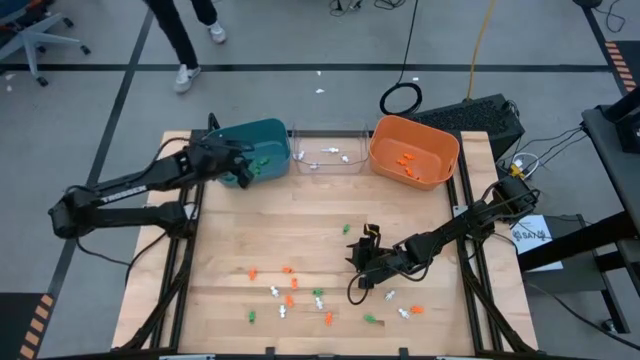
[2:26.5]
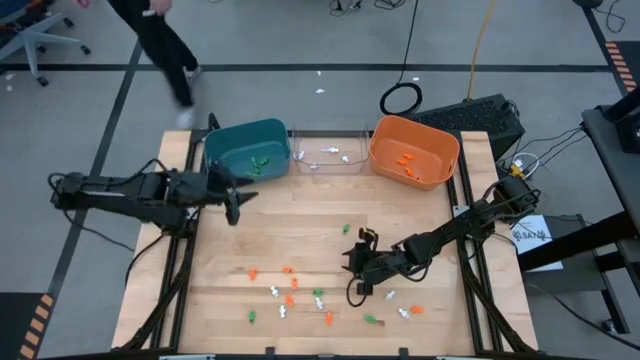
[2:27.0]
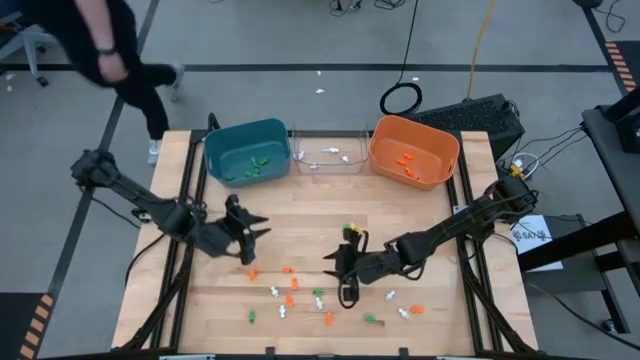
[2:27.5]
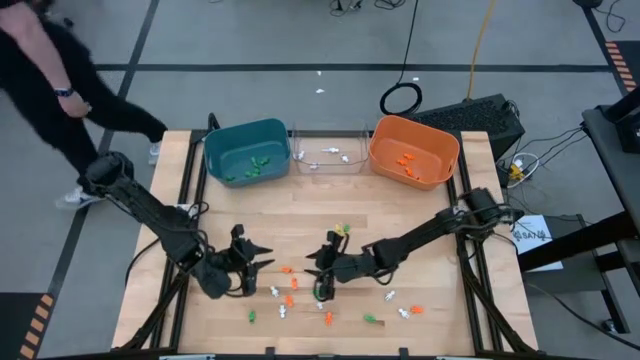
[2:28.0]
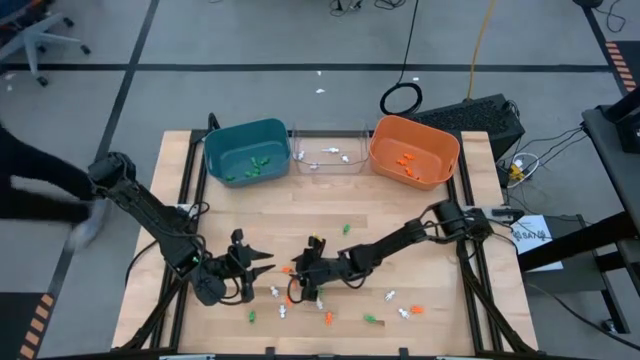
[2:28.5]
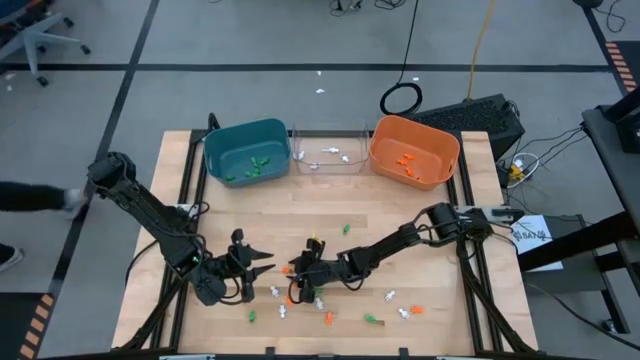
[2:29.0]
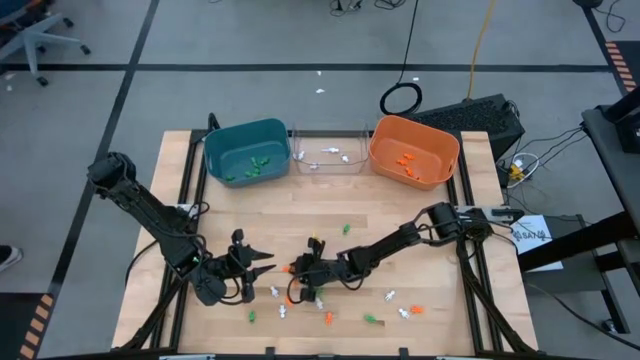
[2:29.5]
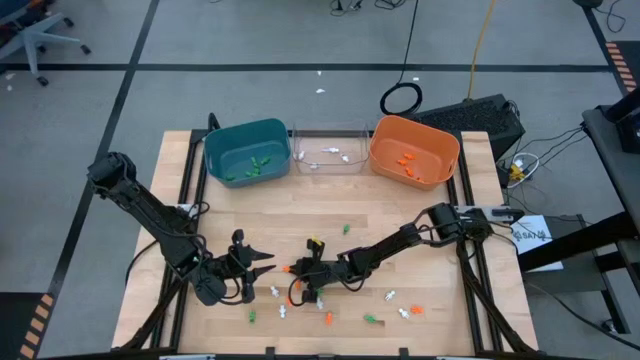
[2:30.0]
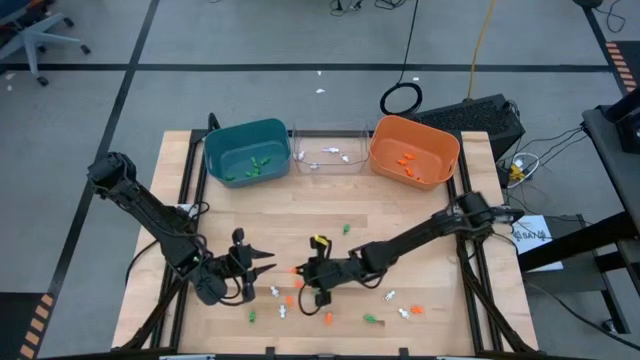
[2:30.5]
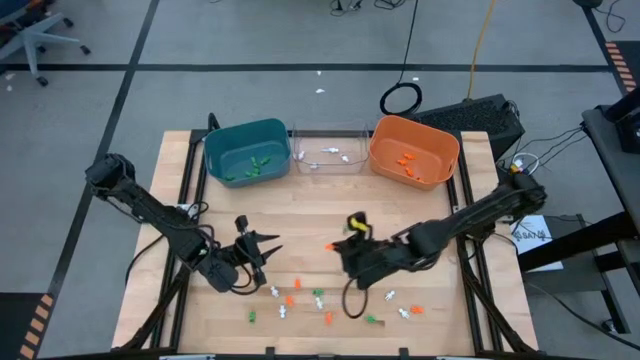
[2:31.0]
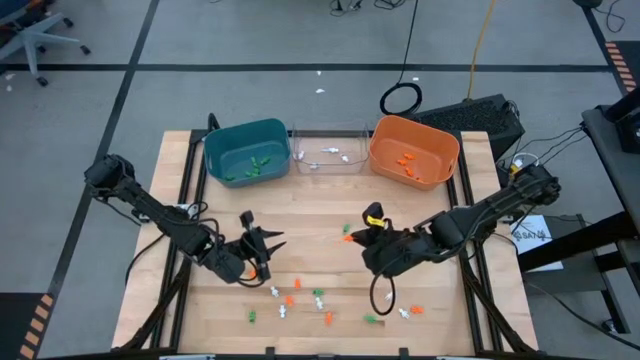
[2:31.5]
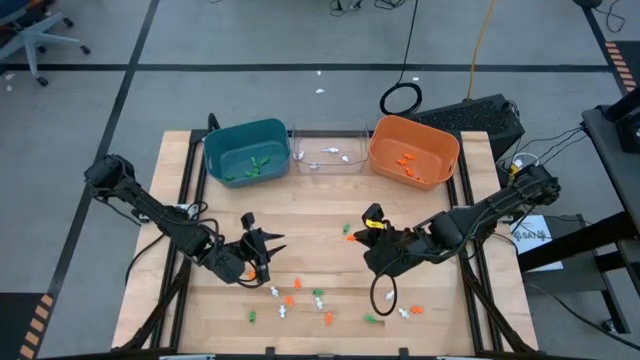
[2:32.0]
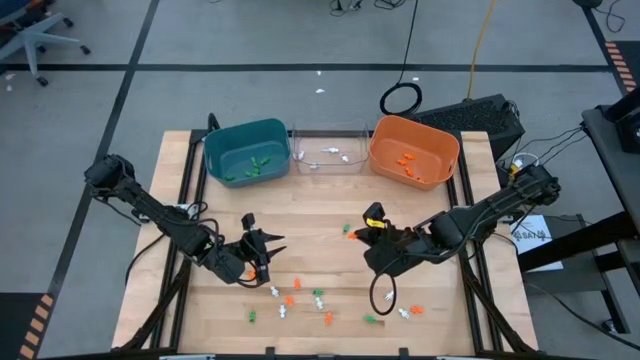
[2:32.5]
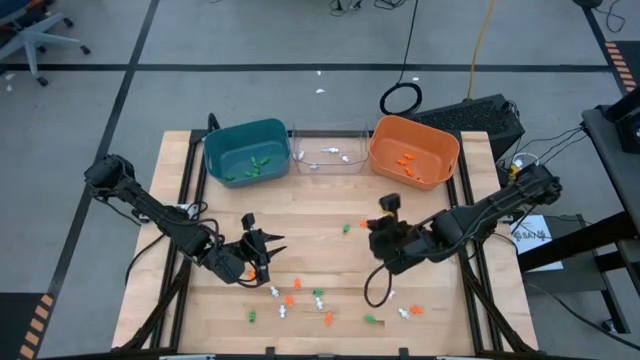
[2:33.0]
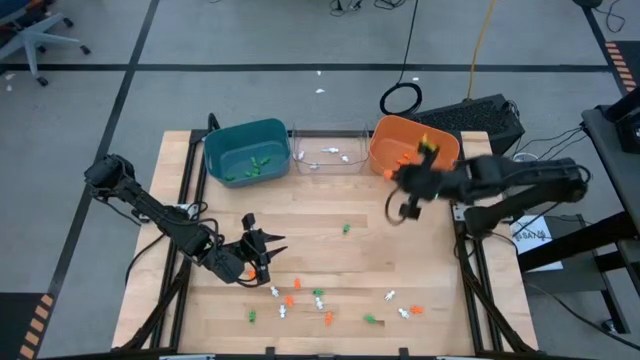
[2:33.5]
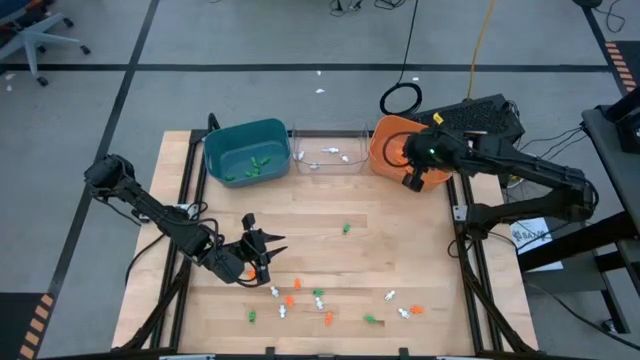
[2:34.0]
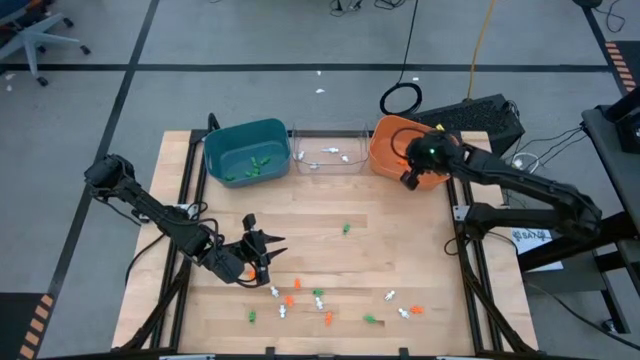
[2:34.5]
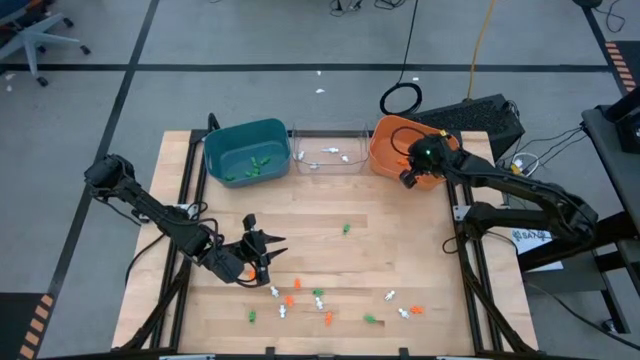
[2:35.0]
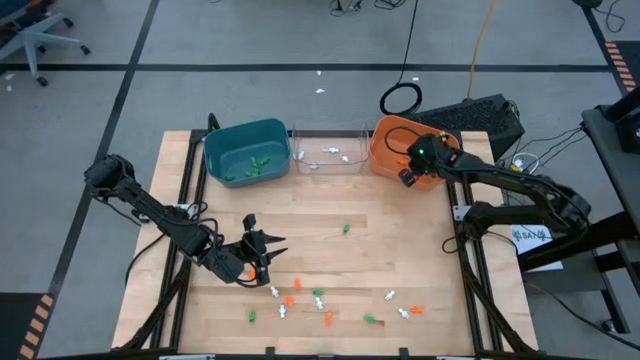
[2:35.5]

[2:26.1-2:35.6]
Task: Sort Halloween decoration
Put the orange skeleton toy into the orange bin

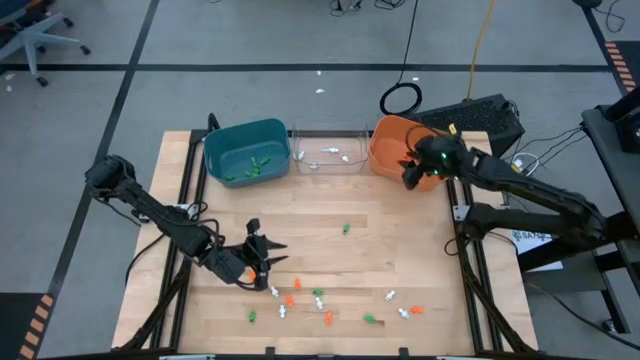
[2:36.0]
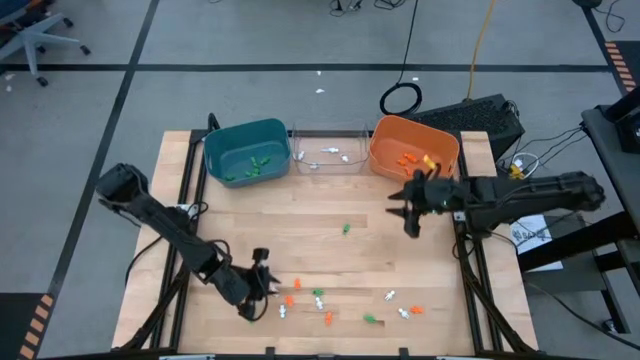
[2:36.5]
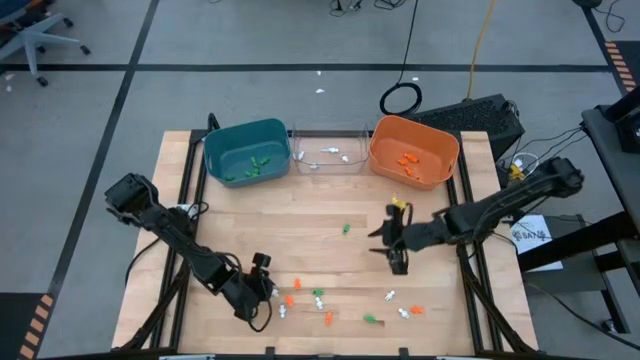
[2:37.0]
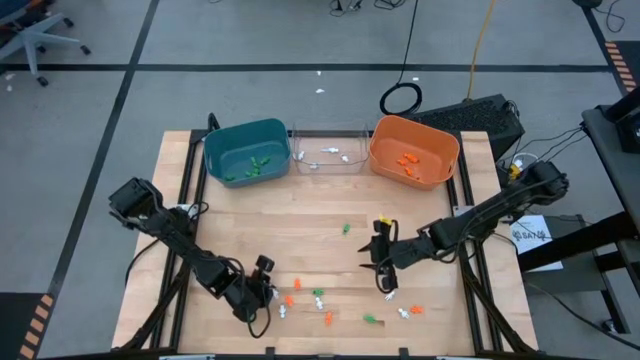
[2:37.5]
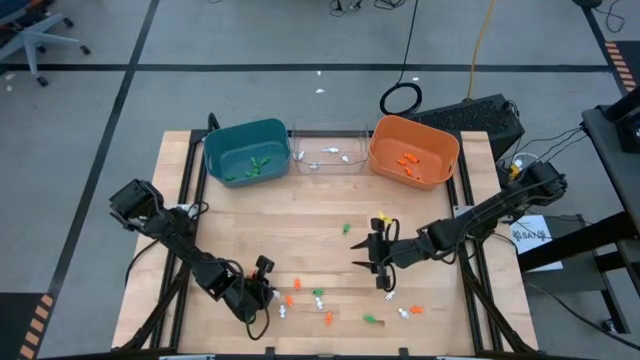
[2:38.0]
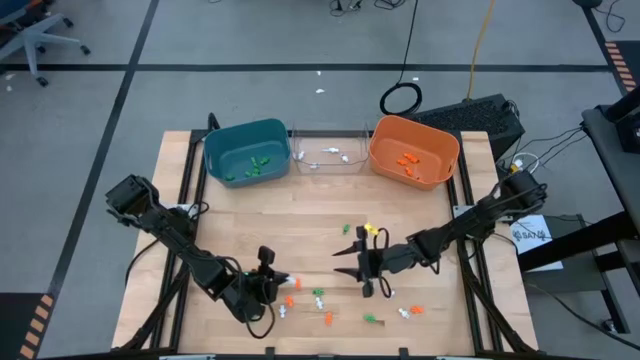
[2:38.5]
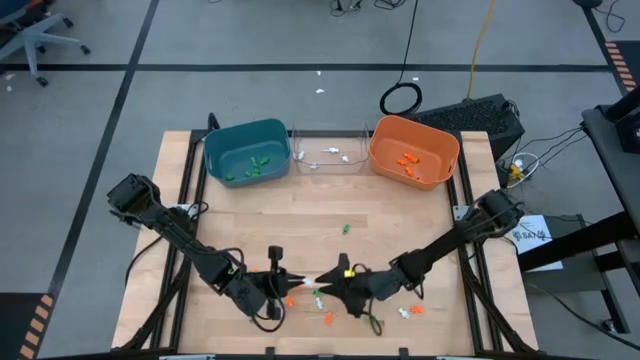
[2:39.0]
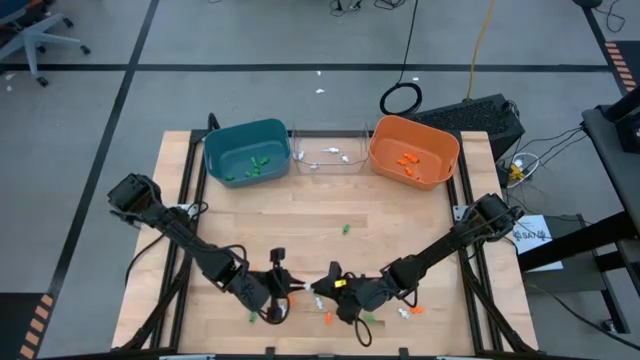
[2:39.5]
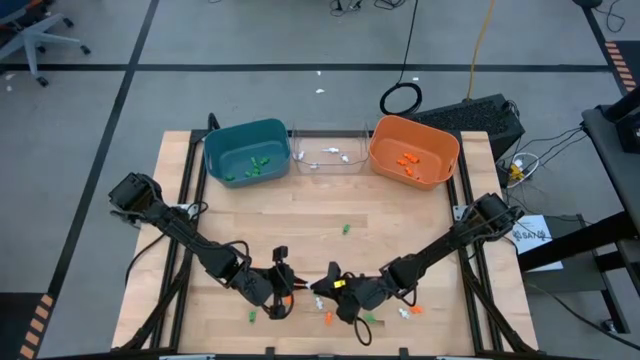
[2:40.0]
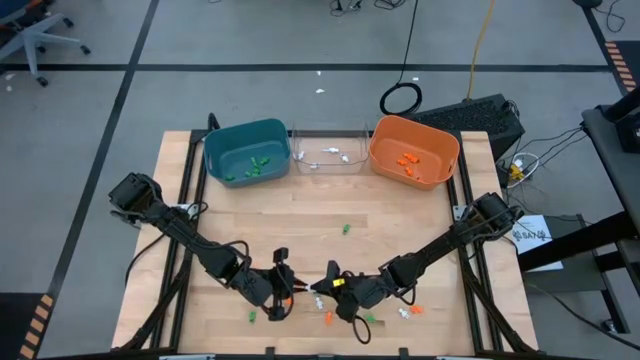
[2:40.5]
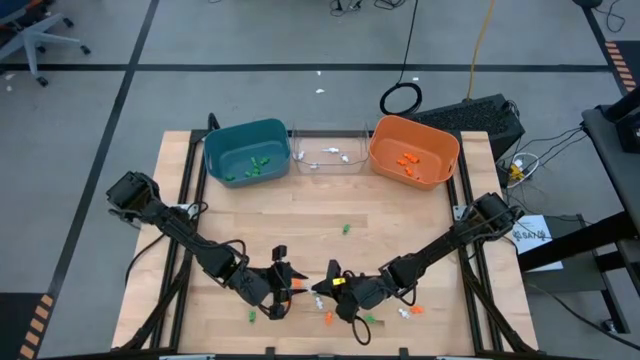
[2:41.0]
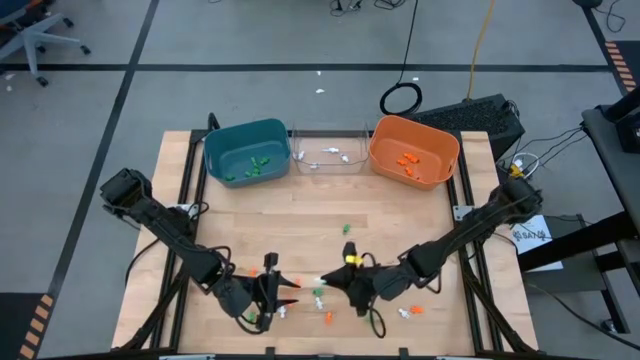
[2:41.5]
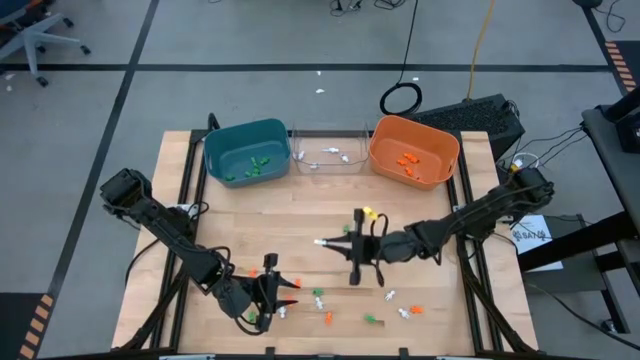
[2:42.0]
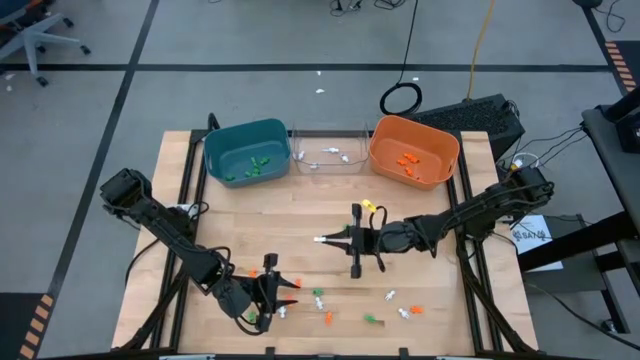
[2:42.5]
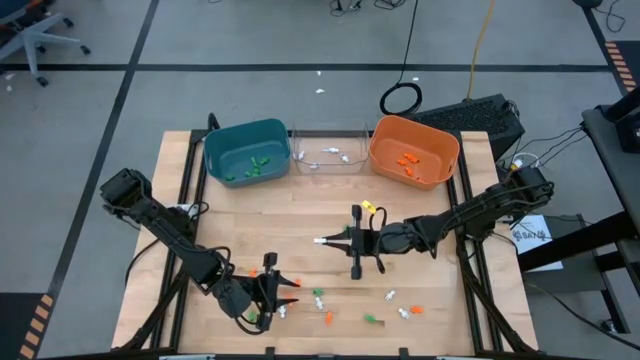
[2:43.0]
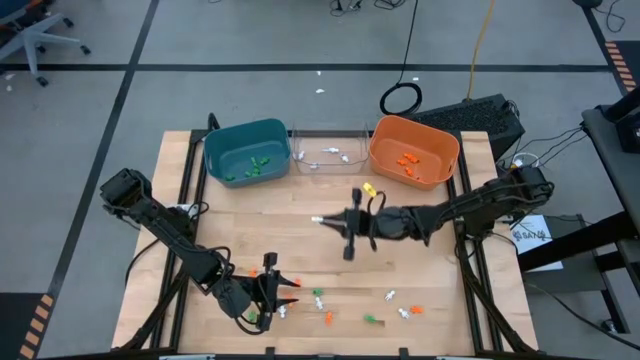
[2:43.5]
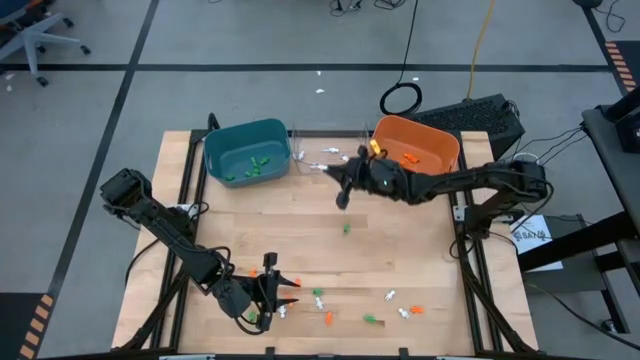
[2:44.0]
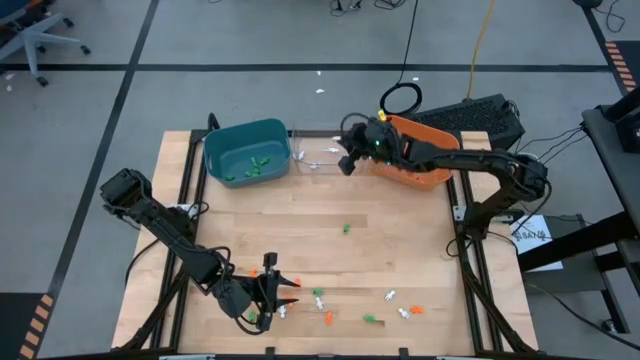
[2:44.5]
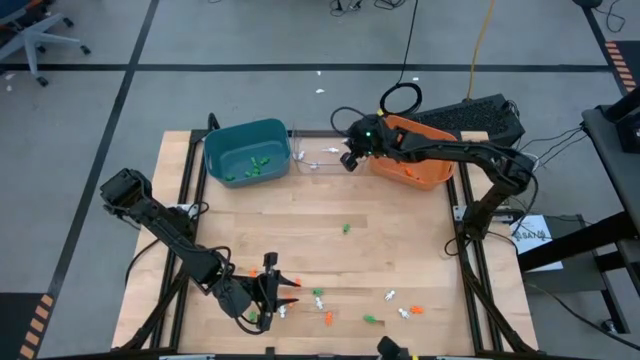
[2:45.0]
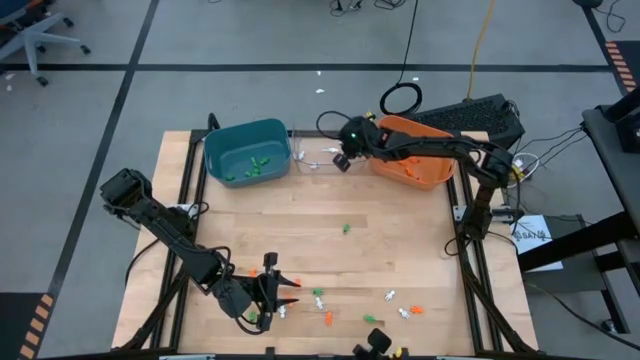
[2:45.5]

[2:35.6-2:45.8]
Put the white skeleton toy into the transparent bin

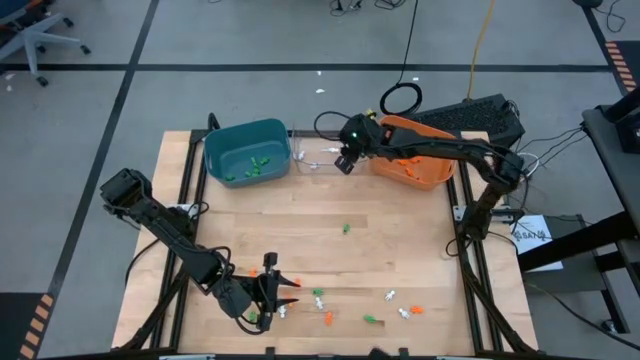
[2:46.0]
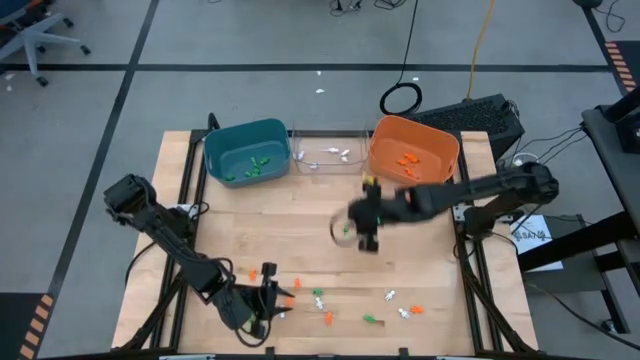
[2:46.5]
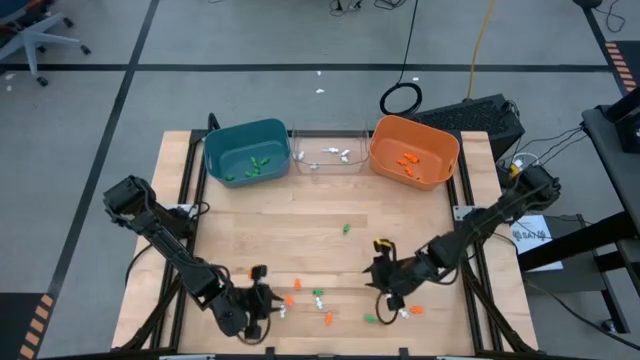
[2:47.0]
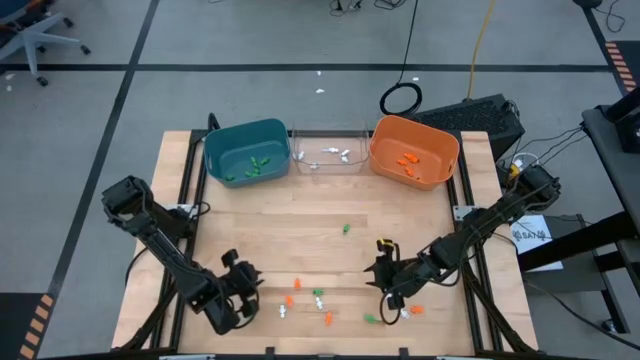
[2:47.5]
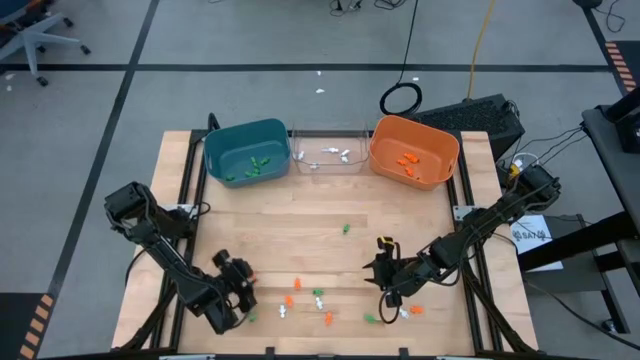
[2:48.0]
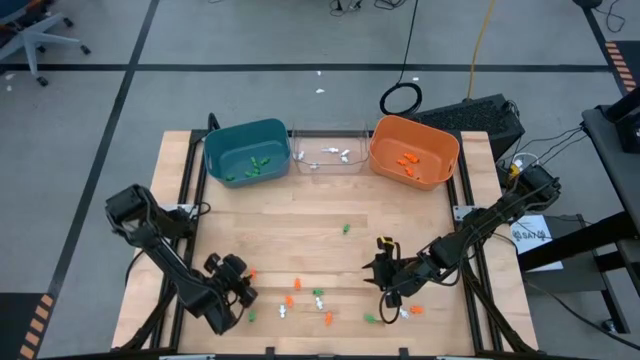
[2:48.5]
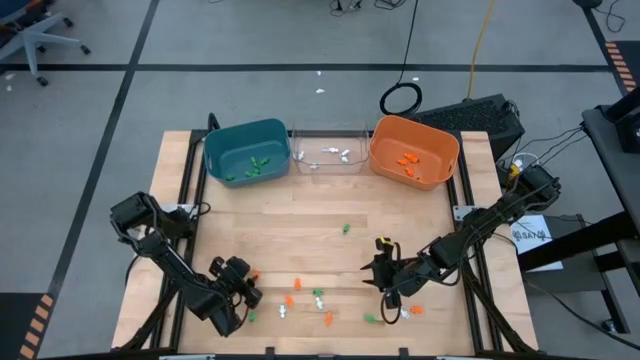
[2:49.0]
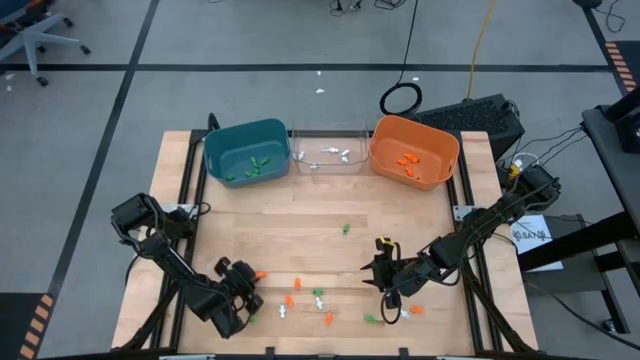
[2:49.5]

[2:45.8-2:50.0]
Put the orange skeleton toy into the orange bin
